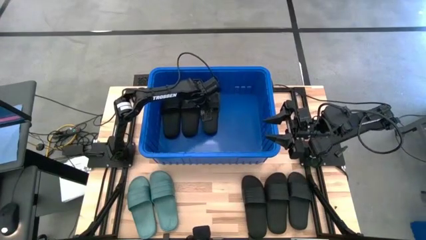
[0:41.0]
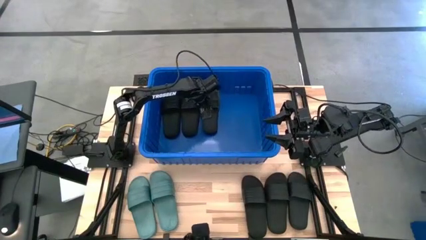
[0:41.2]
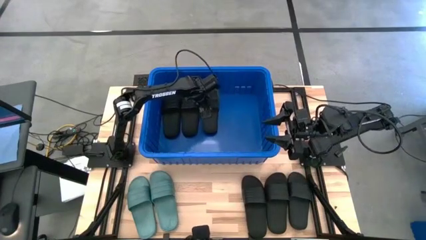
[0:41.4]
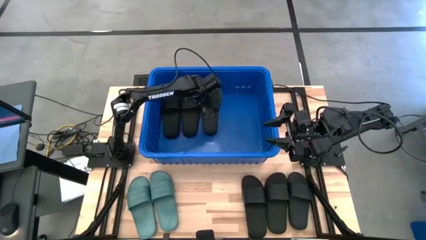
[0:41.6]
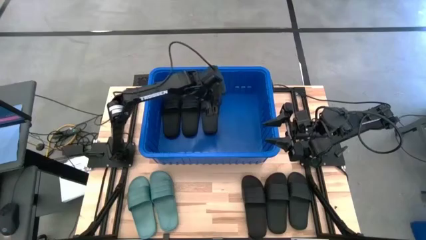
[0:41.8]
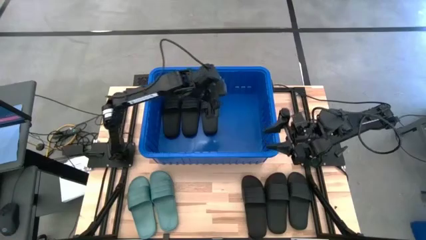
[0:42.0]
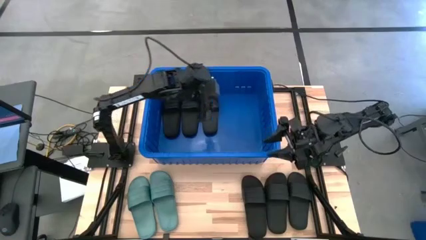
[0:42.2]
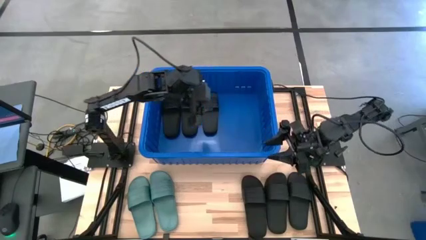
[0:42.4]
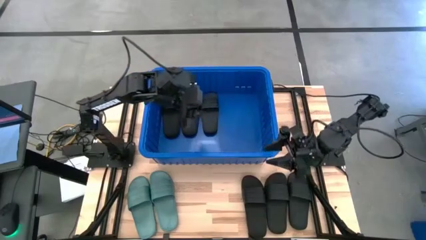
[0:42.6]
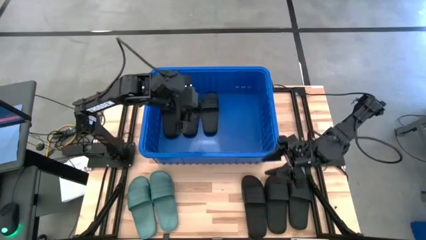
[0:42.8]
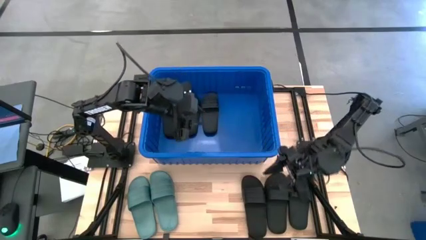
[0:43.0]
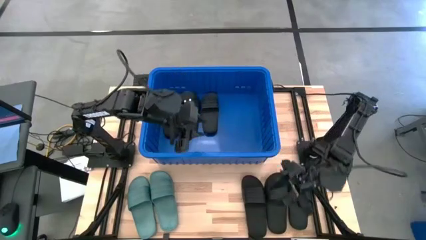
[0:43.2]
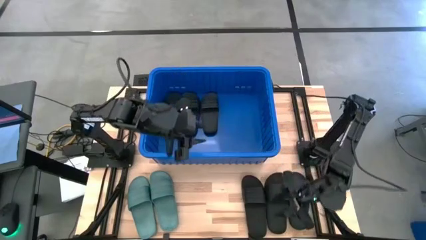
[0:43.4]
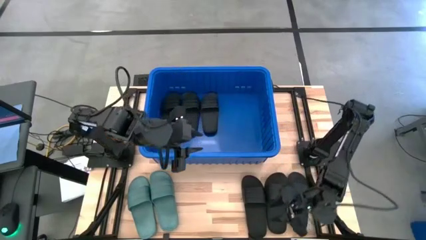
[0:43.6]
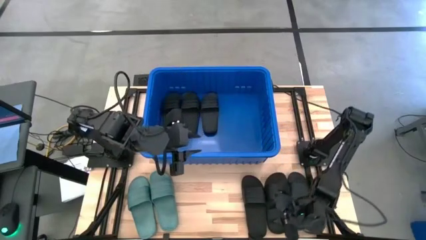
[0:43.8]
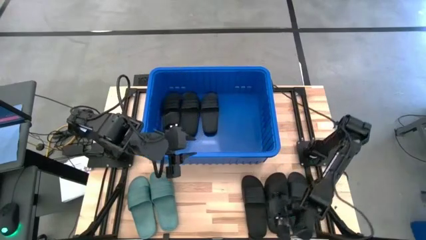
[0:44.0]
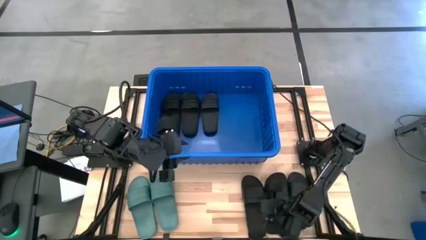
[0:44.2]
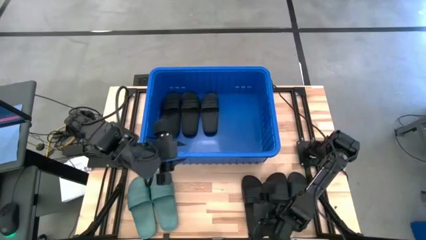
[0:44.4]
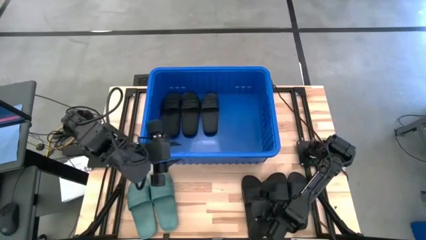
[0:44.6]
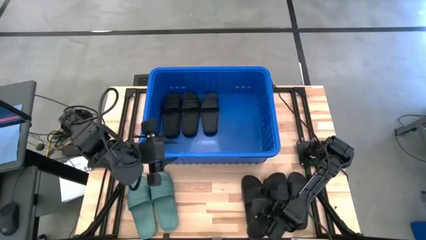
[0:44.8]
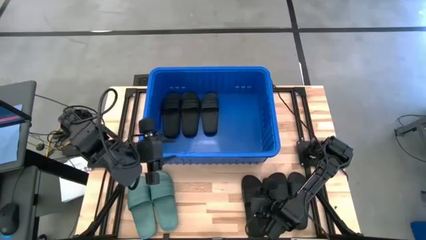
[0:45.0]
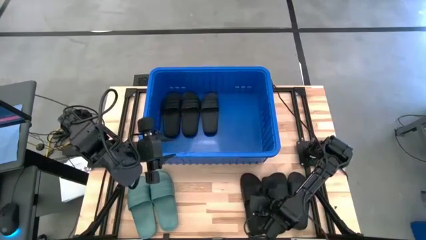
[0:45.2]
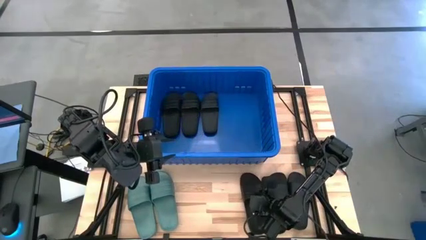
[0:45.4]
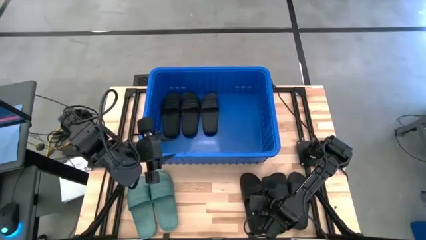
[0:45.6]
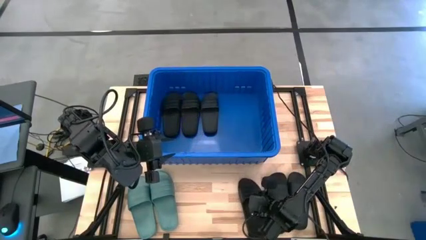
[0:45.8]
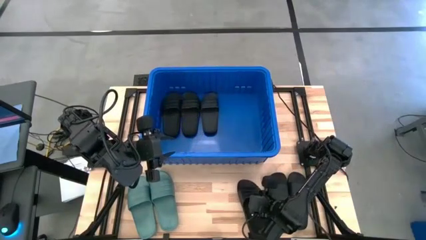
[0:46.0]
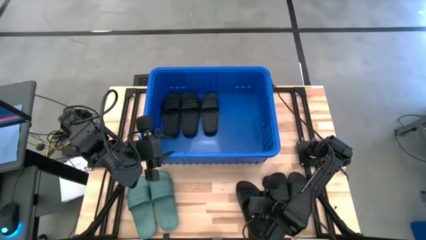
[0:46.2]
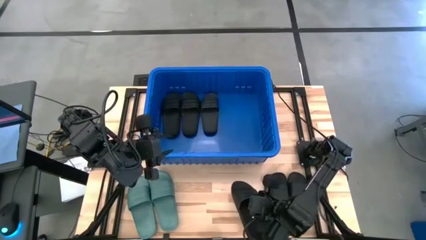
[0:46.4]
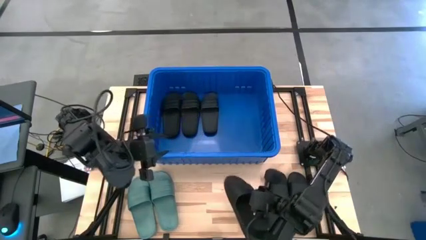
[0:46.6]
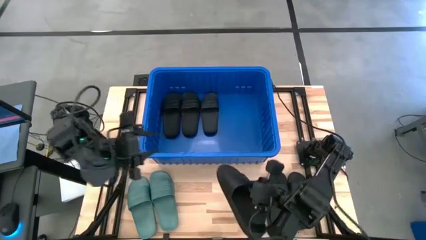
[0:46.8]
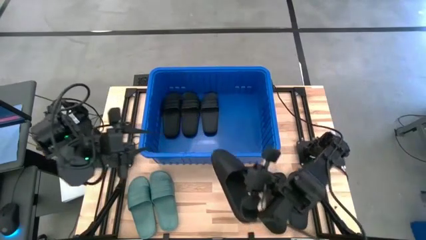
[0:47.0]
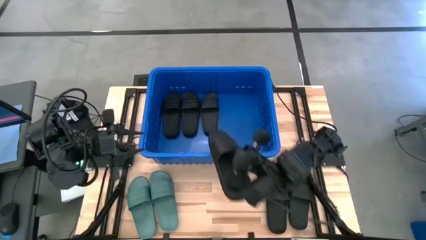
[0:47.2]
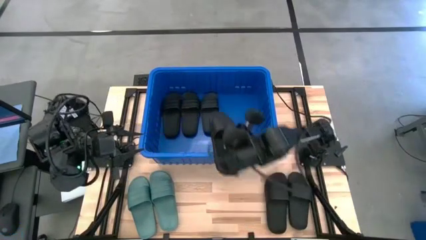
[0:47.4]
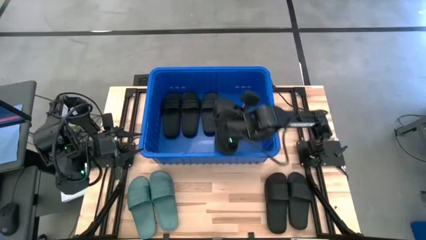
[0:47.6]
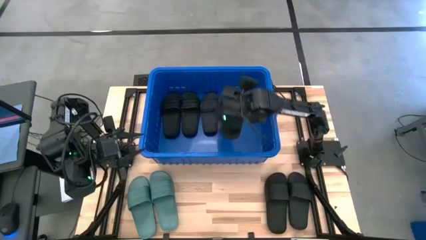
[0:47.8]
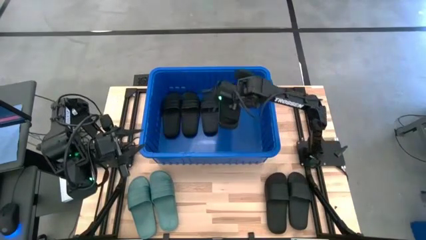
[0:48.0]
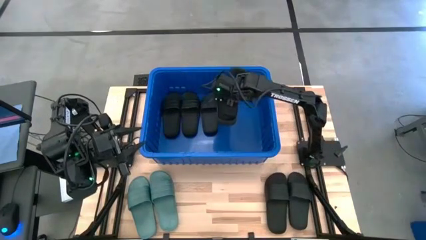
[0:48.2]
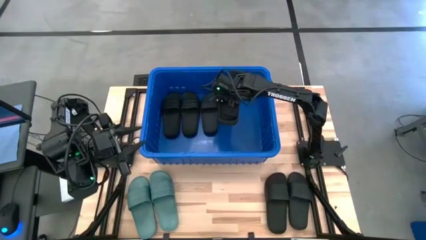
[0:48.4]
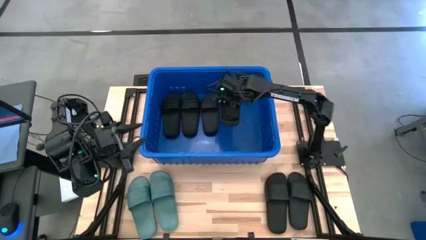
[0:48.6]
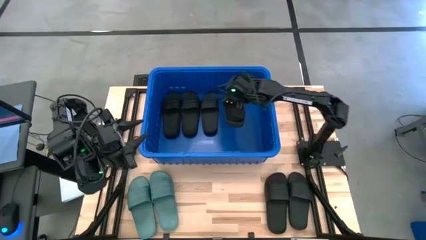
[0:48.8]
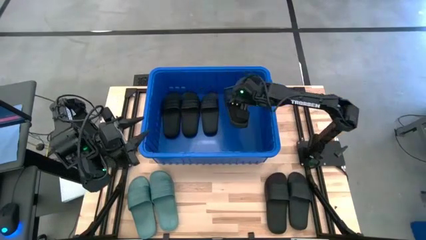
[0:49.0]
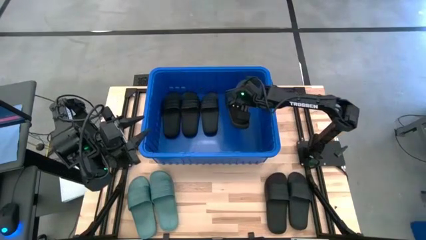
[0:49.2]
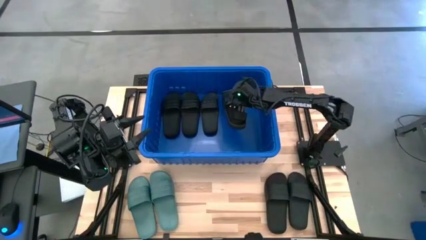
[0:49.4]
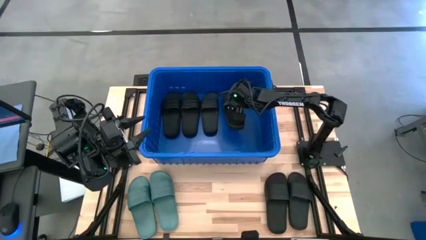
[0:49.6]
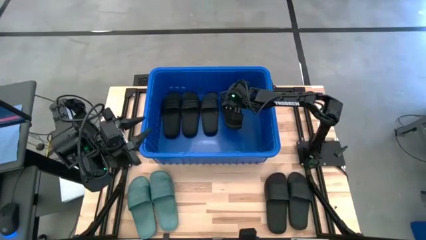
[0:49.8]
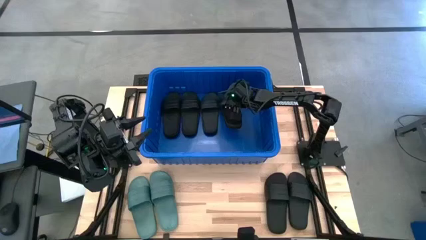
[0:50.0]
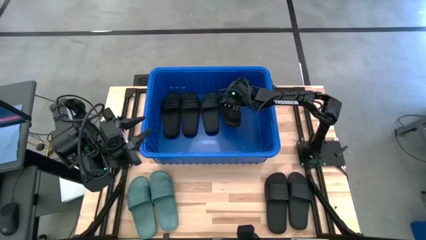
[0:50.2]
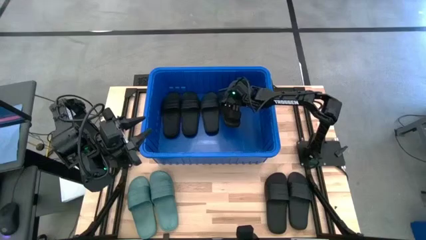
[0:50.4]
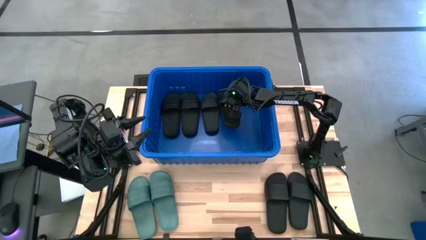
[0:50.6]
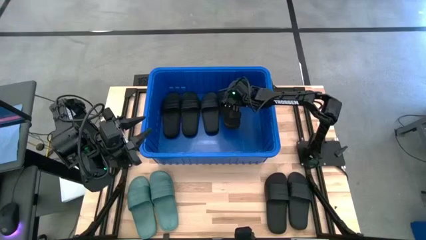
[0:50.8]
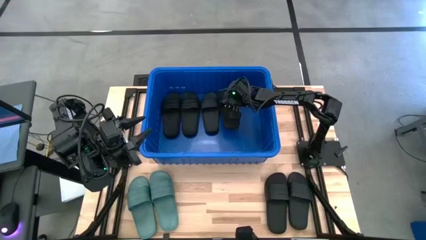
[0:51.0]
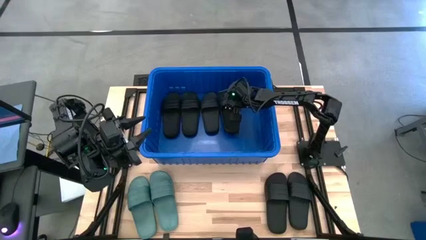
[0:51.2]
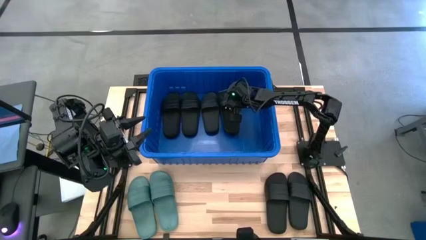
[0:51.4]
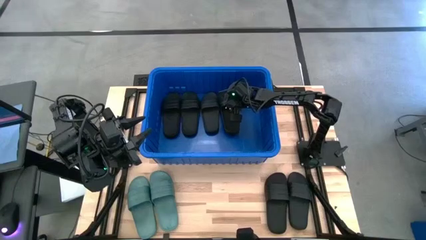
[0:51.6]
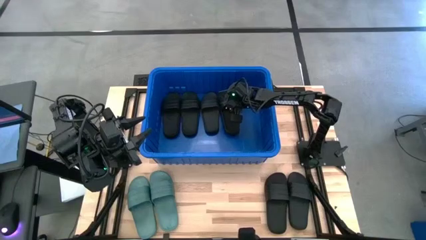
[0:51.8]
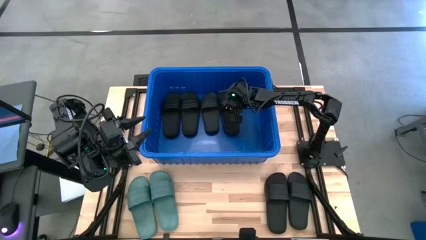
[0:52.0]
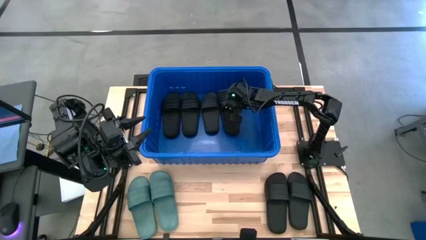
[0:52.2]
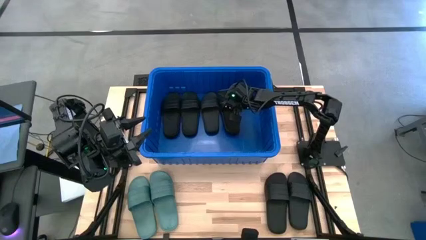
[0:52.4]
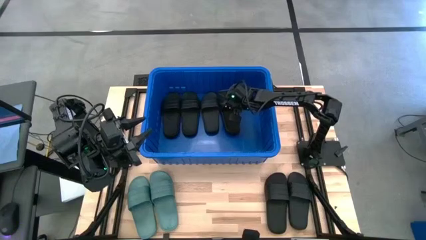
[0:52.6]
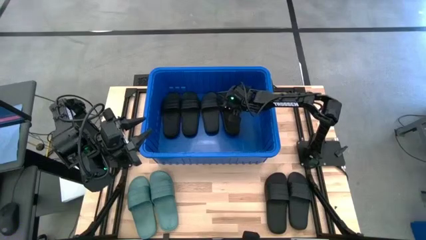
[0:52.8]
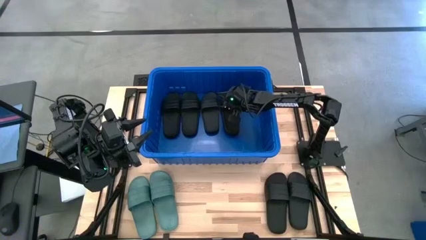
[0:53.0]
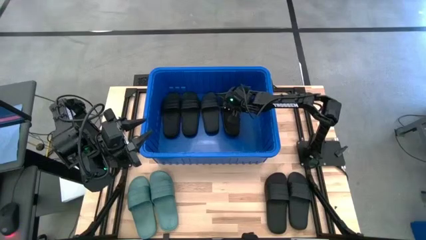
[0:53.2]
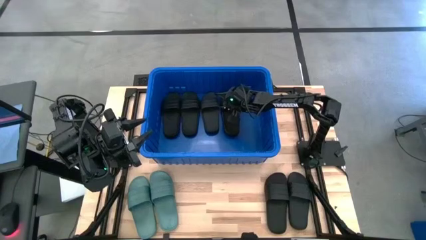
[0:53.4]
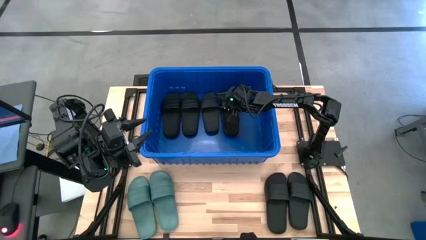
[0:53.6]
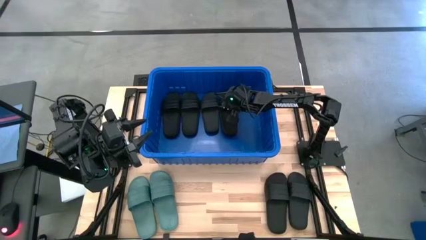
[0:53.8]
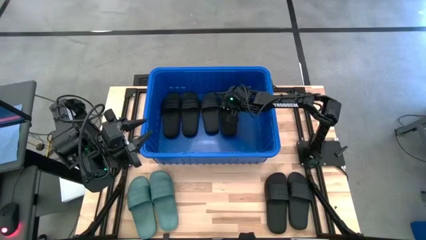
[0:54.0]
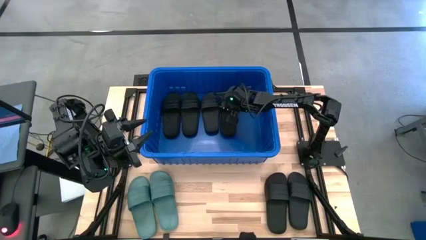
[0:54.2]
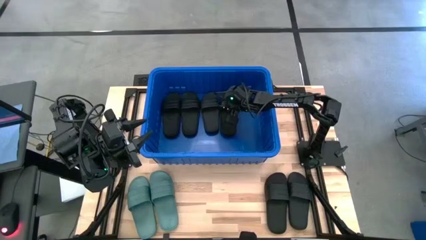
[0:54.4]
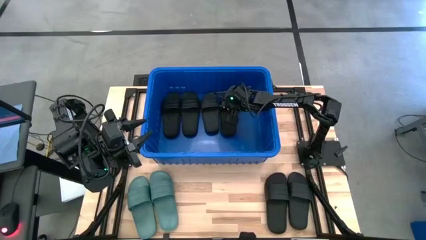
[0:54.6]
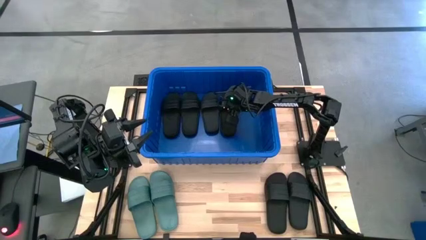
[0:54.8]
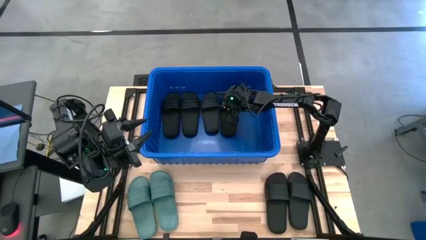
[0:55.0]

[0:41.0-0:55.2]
Task: Pick and place slides into bin
Put the black slide into the blue bin

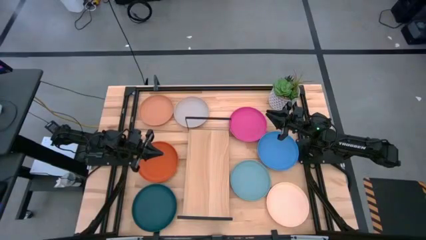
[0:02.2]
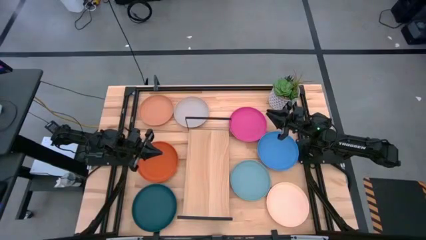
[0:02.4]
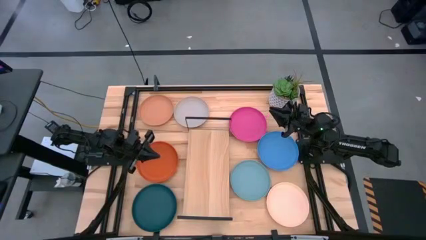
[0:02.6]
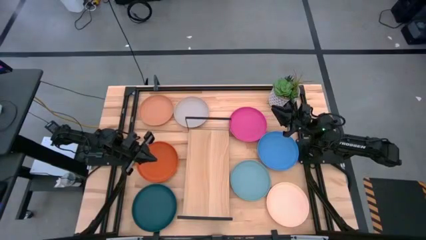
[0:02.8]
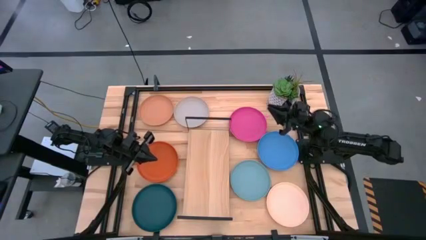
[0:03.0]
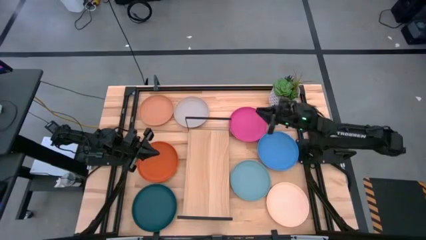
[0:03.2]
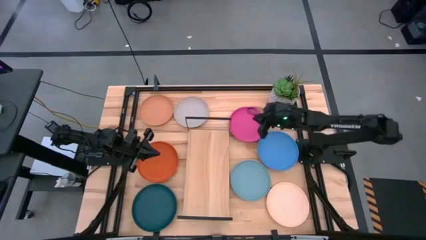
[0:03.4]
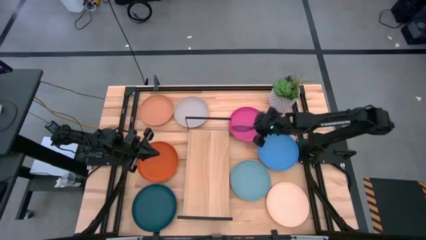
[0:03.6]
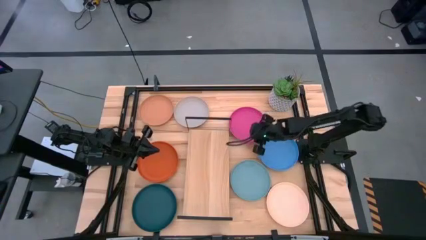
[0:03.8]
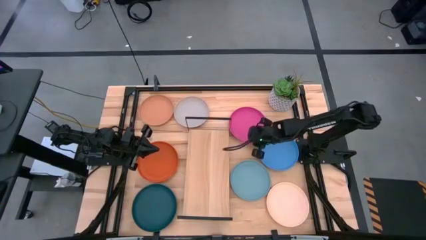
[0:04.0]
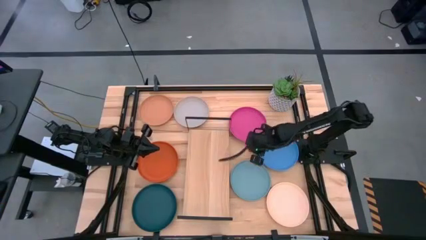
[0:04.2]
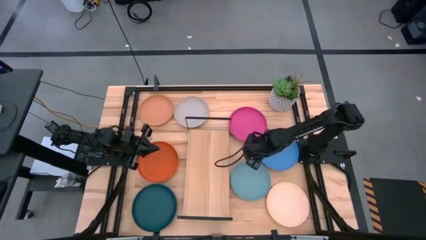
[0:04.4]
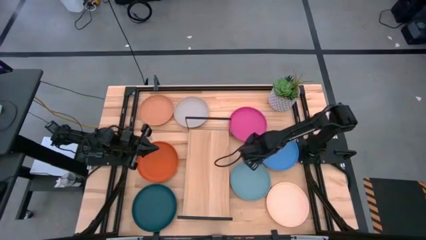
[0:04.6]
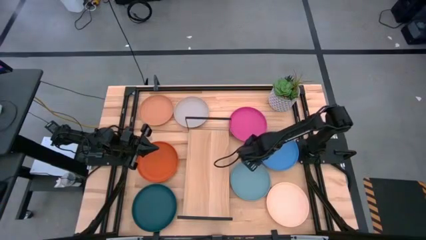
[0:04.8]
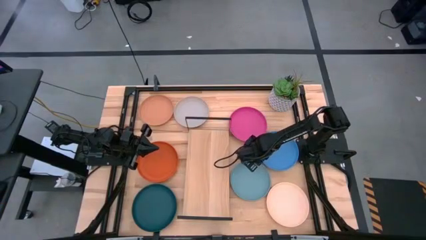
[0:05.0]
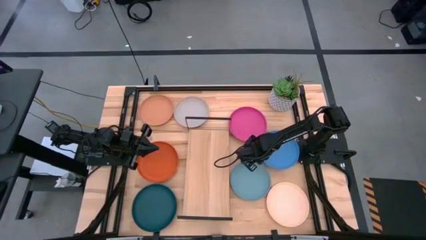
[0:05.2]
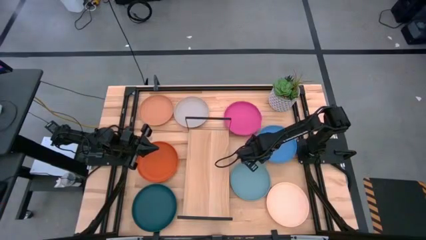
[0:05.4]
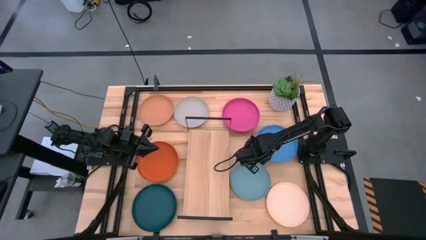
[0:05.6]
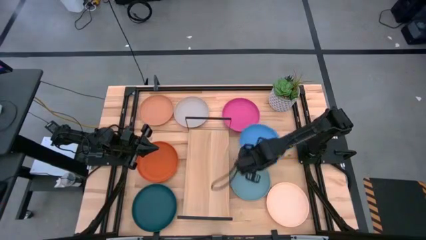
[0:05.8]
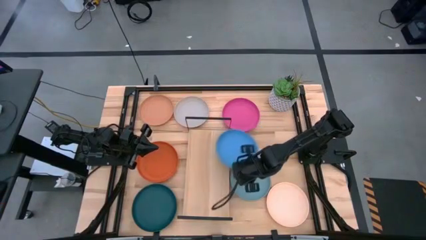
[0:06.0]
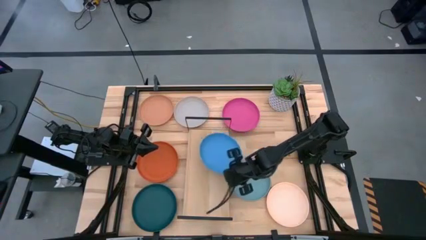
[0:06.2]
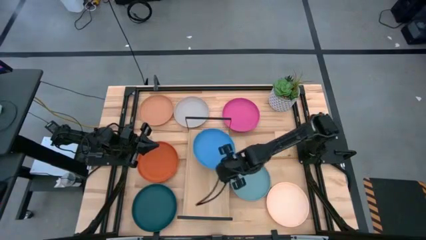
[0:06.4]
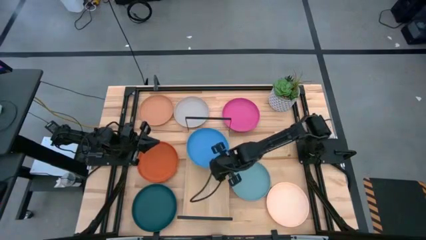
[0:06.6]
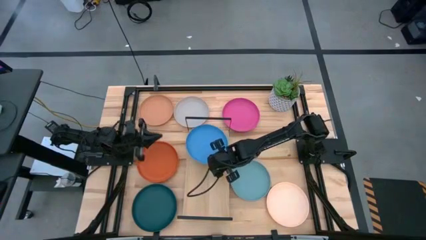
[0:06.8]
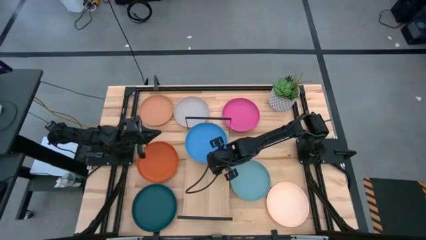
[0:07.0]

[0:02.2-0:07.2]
Task: Place and stack plates onto a shelf
Put the blue plate on the shelf
